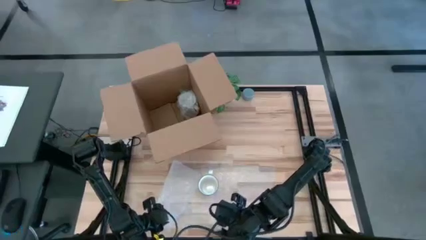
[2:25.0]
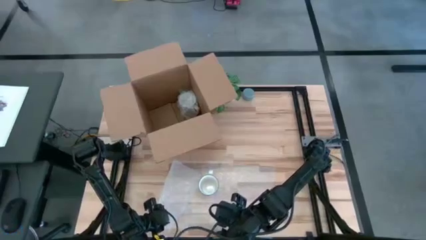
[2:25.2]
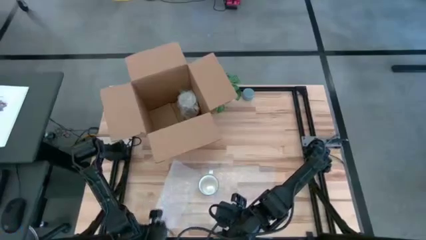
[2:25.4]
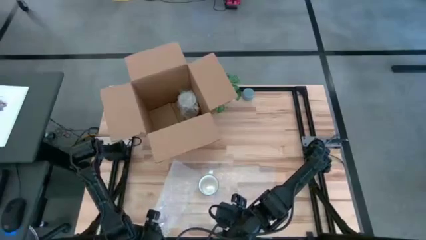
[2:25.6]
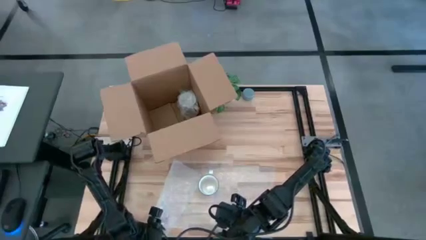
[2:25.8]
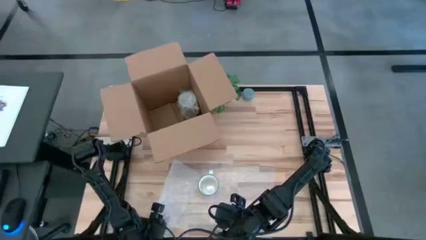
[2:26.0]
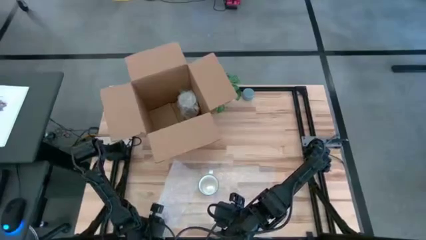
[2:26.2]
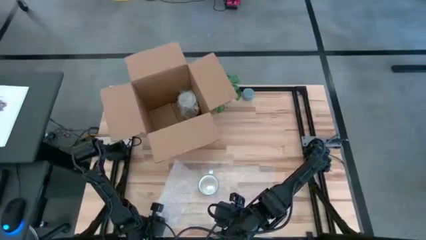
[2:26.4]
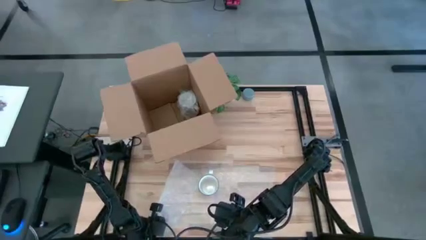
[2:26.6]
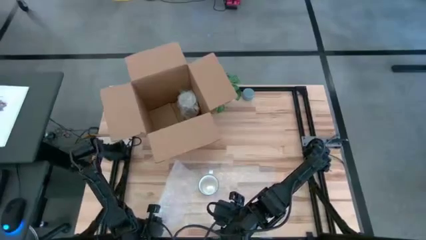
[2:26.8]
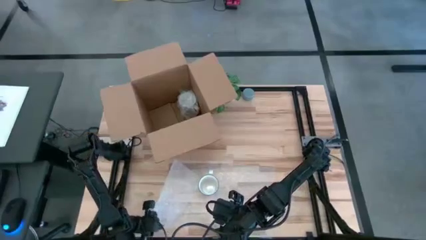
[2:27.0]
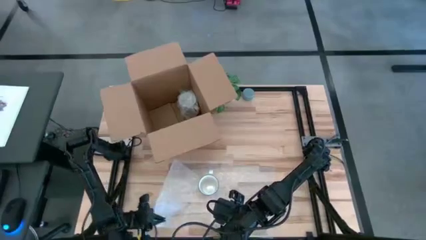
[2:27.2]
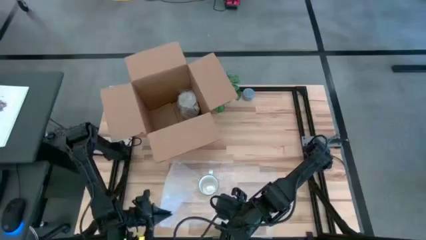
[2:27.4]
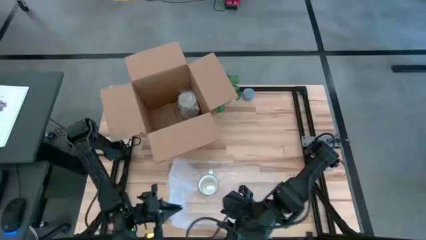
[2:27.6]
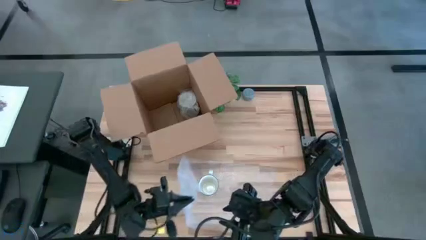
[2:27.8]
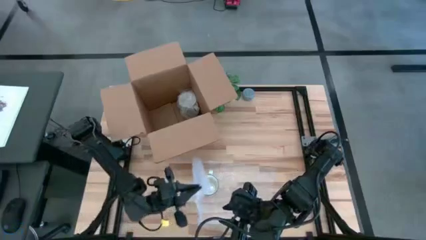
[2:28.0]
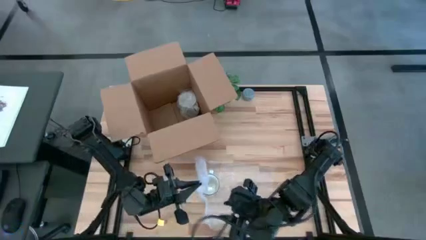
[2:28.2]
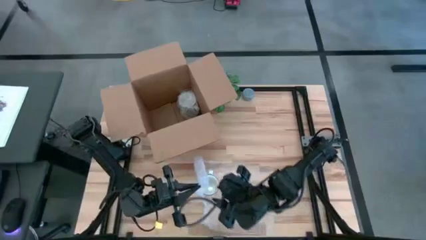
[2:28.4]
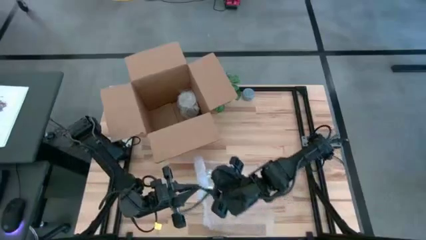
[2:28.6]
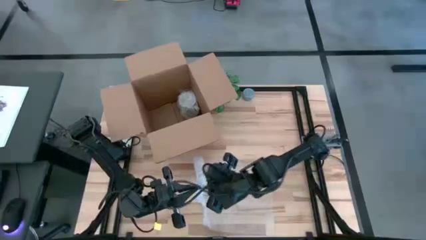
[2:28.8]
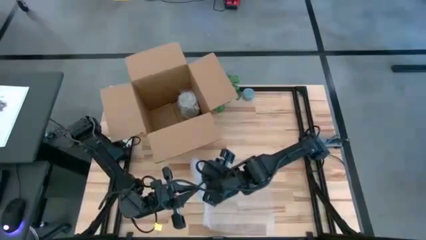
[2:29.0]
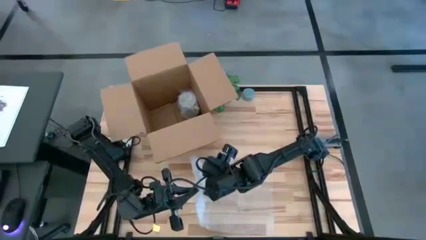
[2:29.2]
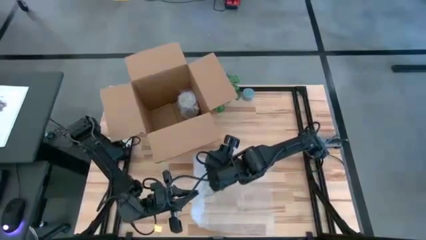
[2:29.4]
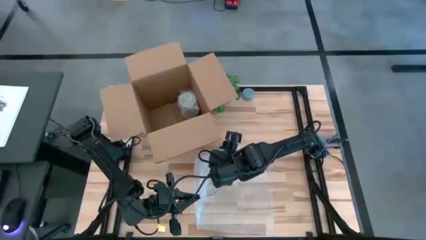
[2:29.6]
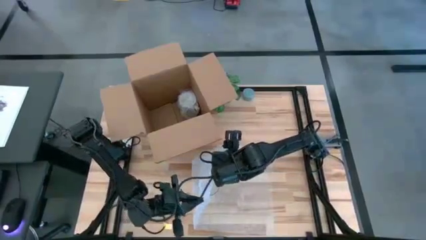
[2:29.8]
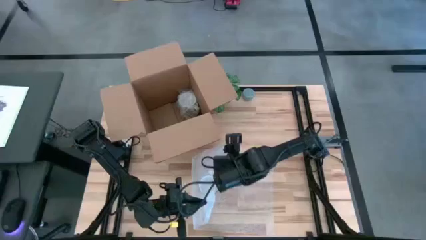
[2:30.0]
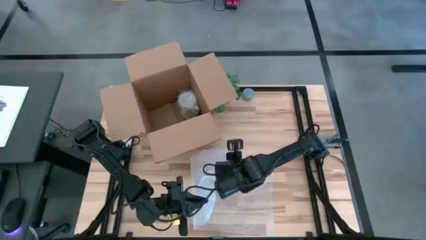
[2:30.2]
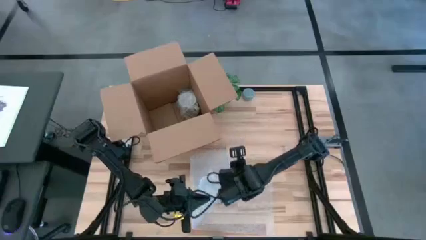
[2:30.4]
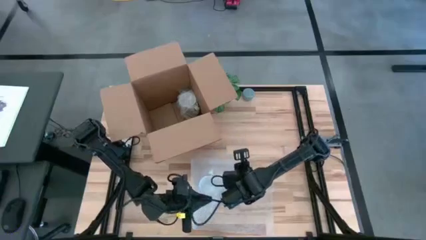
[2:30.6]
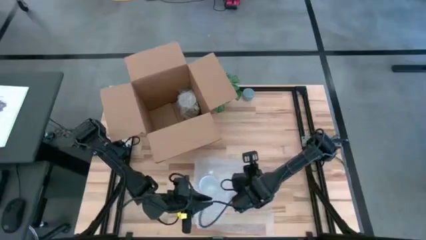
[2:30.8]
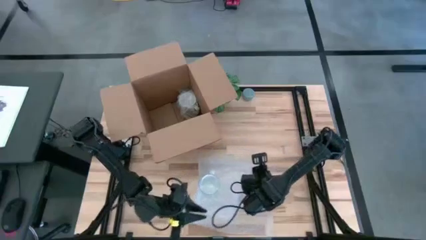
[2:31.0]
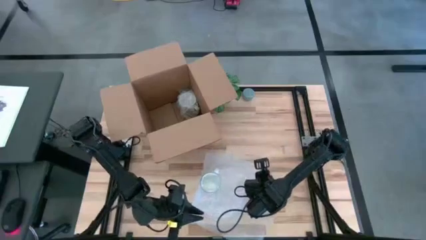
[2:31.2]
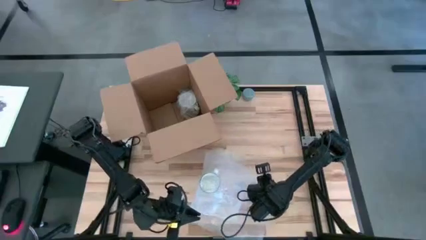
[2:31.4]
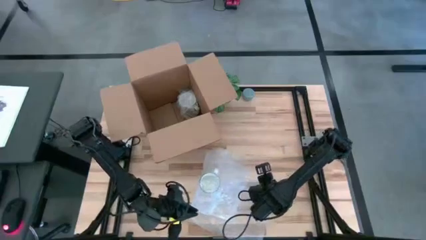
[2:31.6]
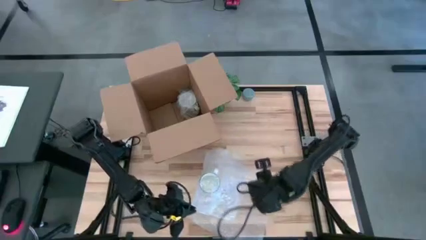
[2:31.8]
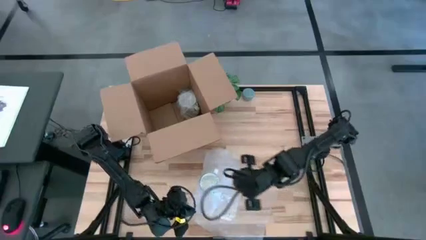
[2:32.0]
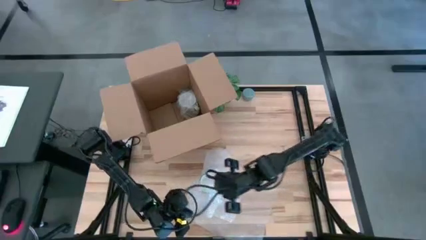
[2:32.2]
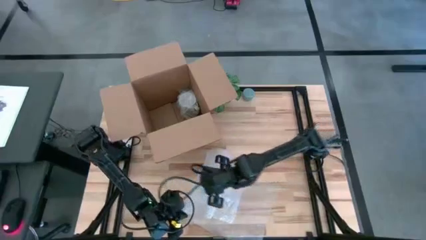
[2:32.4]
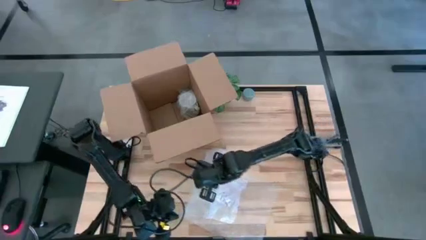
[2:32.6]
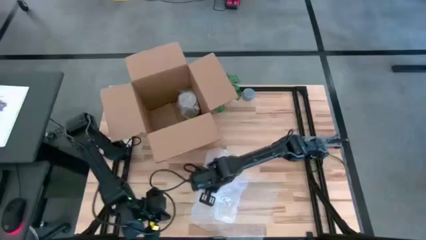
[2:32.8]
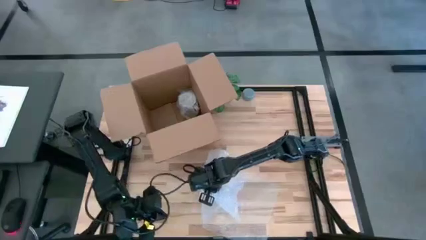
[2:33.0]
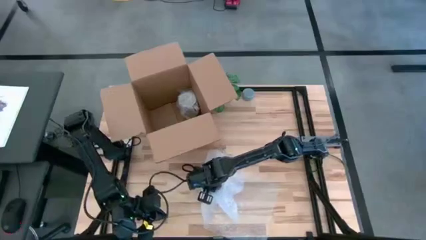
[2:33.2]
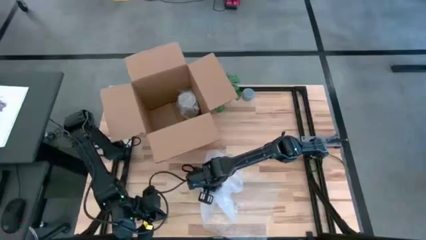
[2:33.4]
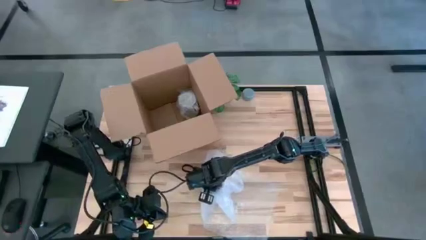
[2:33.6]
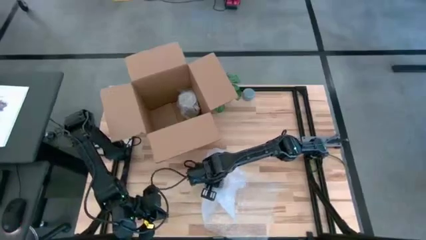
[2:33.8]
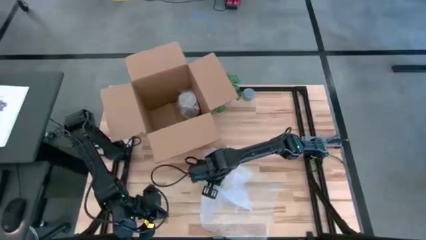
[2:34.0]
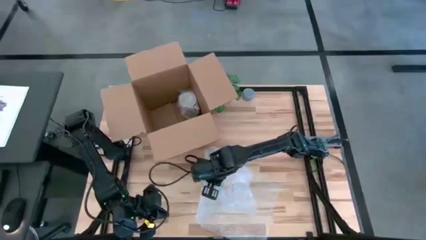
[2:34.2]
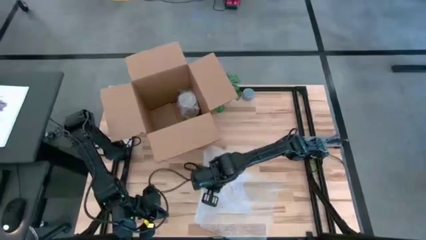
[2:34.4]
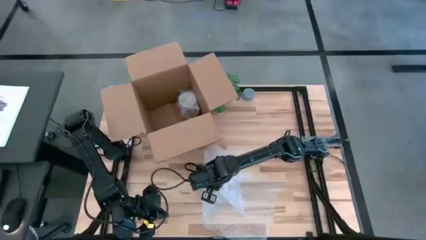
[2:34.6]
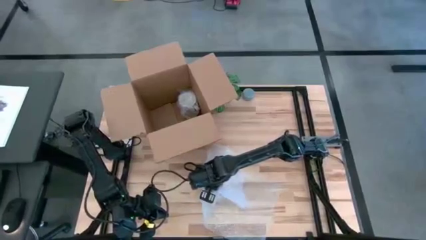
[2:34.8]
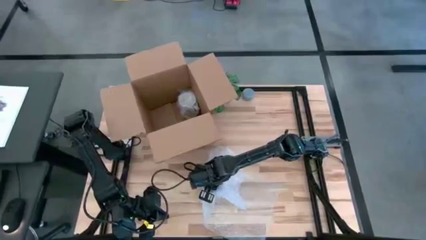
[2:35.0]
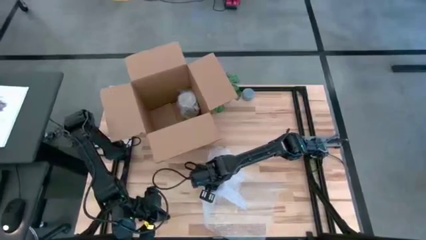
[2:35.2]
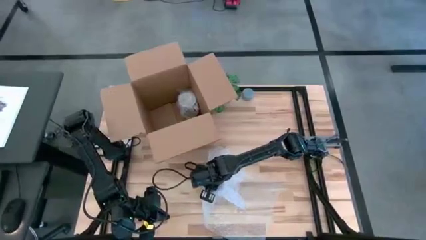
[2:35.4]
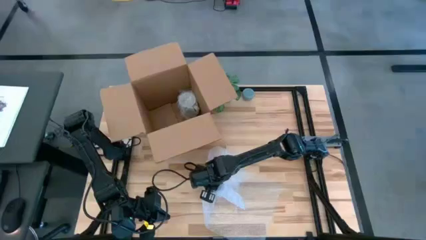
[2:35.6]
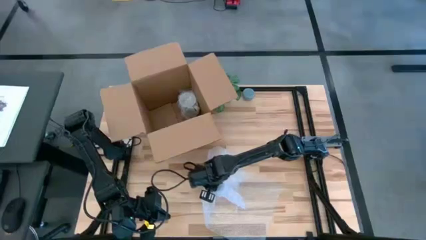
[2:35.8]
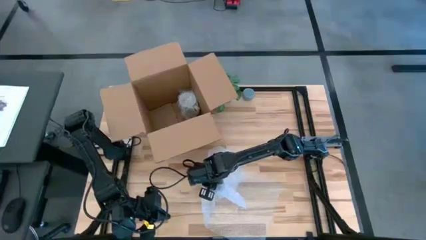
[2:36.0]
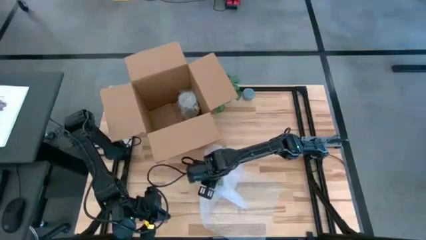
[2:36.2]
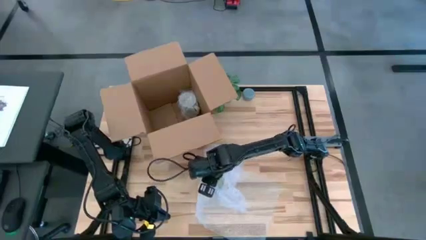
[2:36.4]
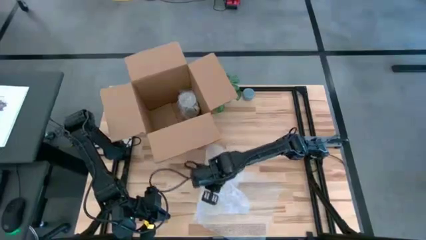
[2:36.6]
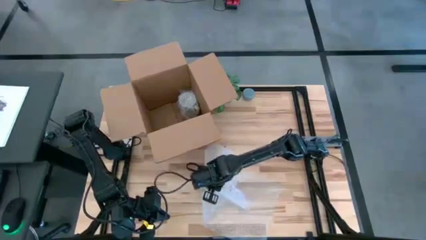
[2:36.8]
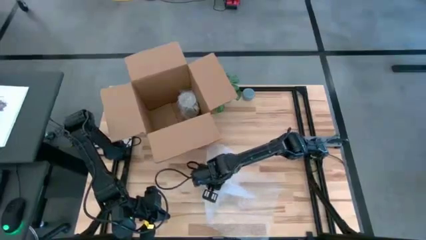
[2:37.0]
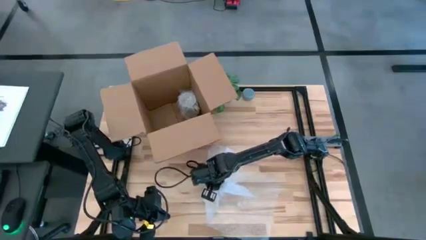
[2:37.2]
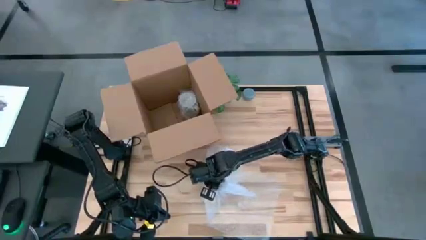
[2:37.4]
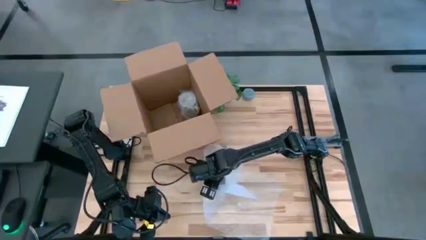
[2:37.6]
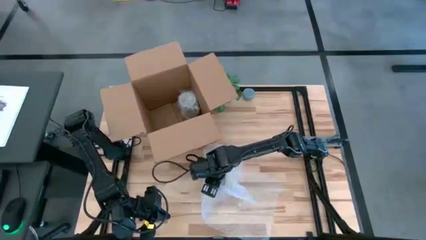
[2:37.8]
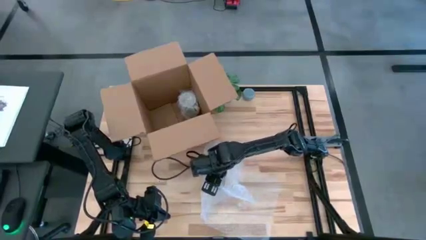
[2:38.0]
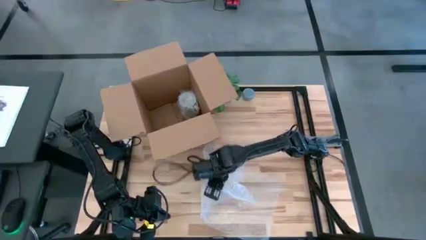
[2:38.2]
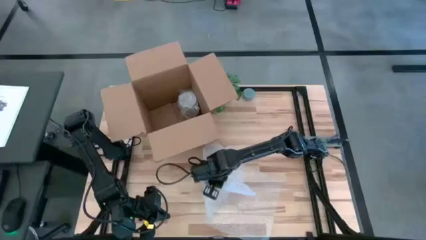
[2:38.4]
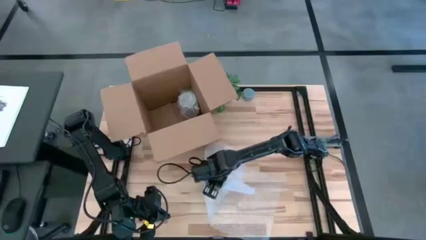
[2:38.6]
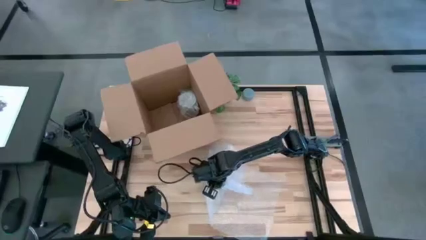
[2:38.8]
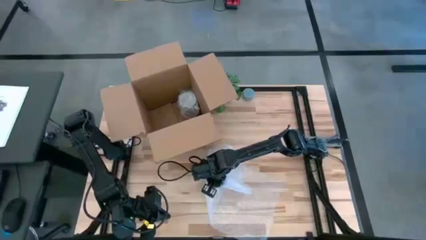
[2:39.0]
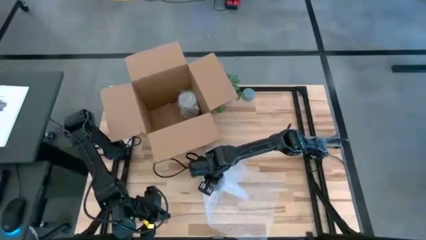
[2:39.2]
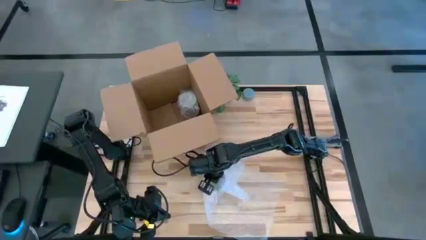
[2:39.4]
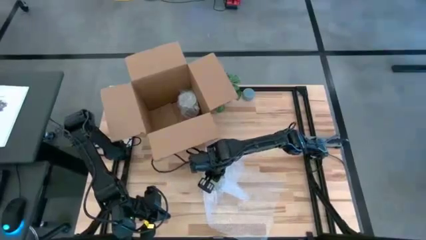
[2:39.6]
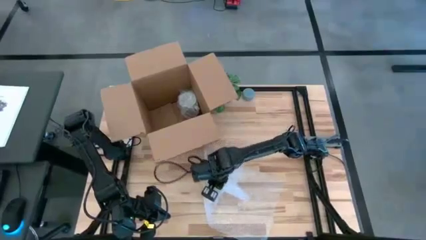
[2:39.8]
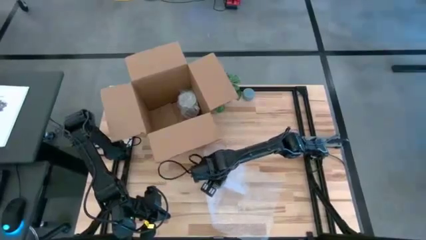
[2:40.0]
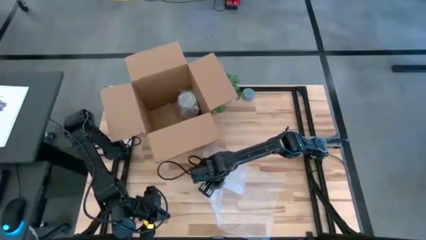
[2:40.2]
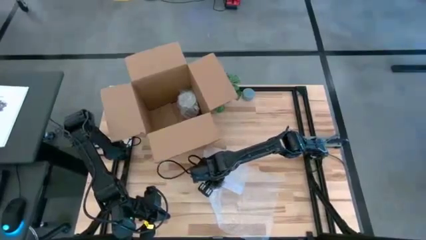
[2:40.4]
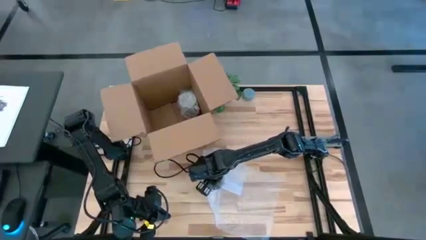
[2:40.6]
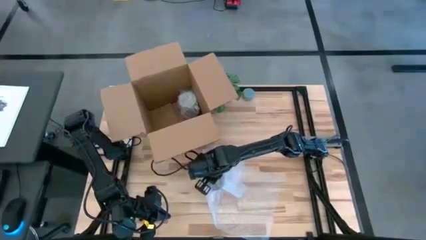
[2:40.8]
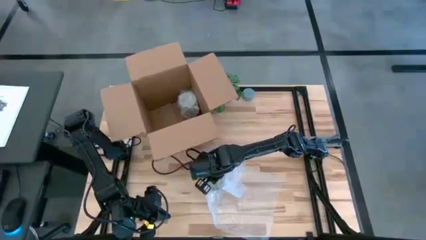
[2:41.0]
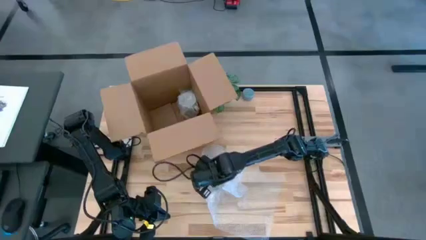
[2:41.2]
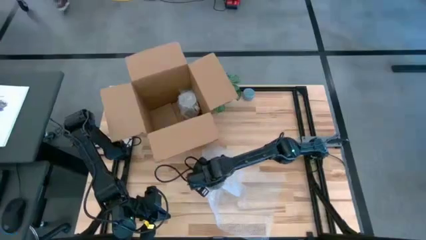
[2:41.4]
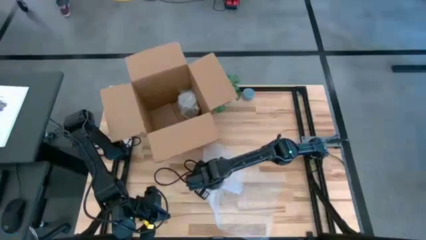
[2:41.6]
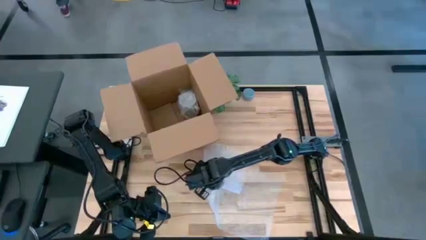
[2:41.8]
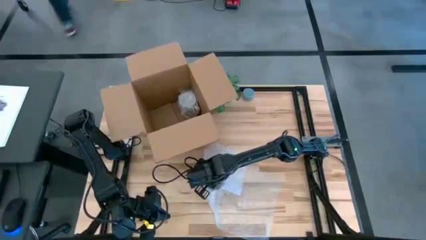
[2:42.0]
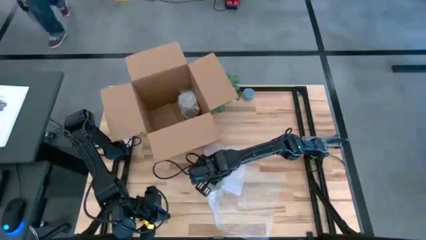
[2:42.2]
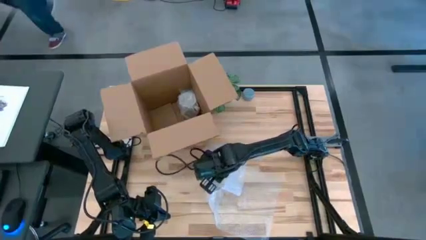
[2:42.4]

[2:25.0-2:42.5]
Task: wrap mug
Wrap the blue mug with the bubble wrap
